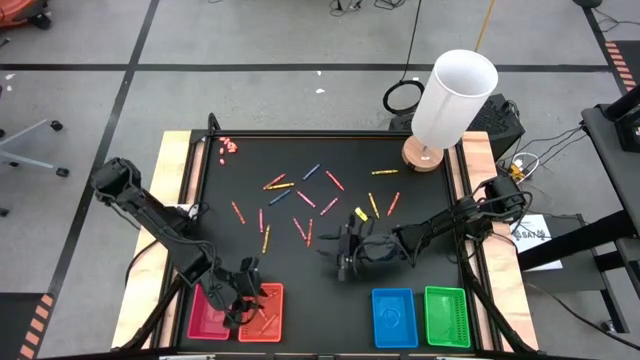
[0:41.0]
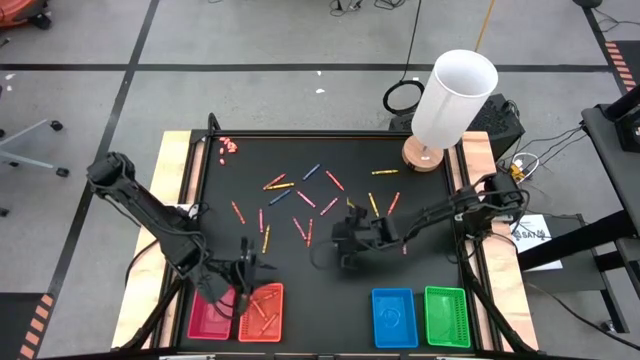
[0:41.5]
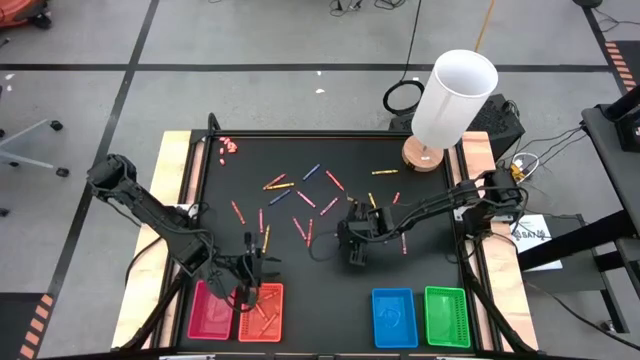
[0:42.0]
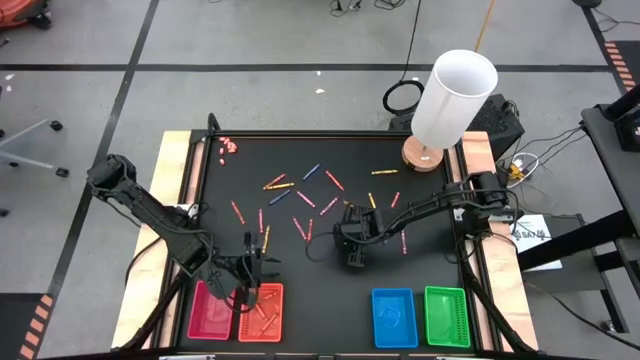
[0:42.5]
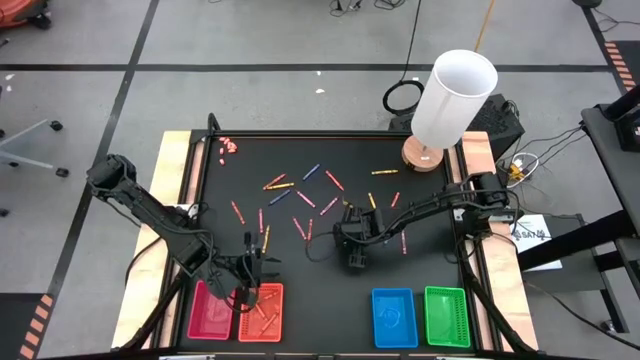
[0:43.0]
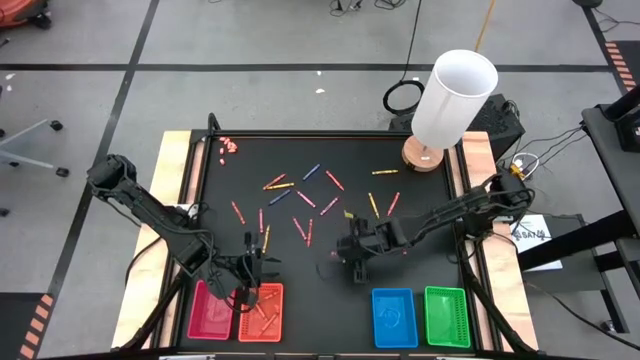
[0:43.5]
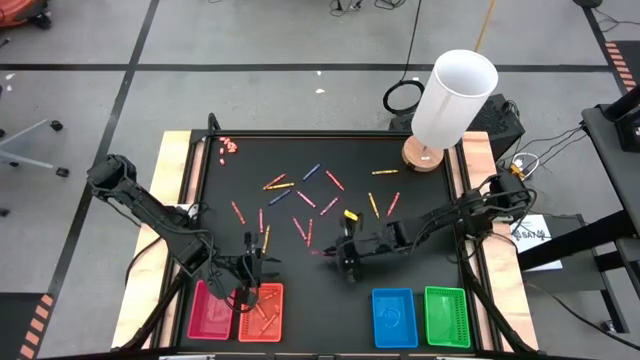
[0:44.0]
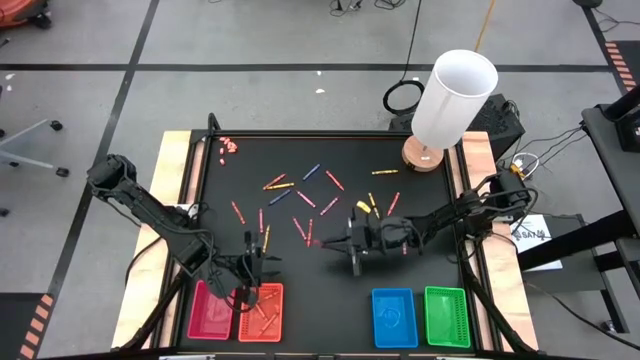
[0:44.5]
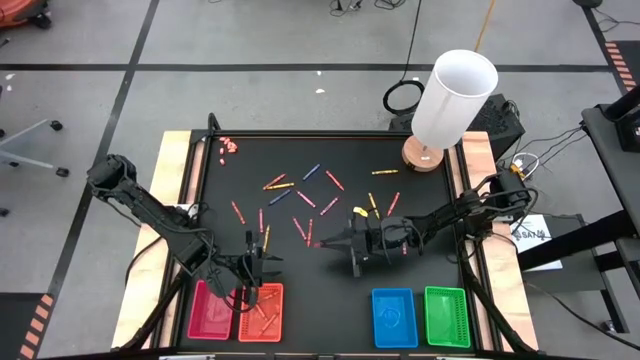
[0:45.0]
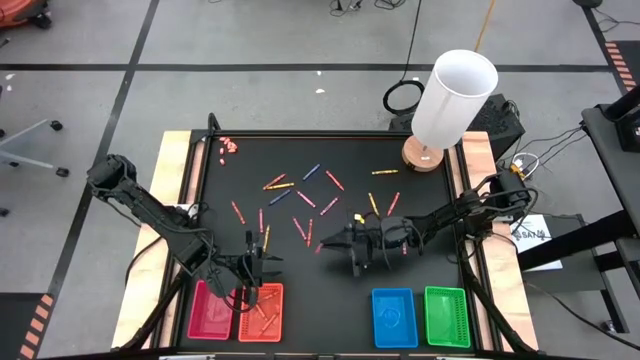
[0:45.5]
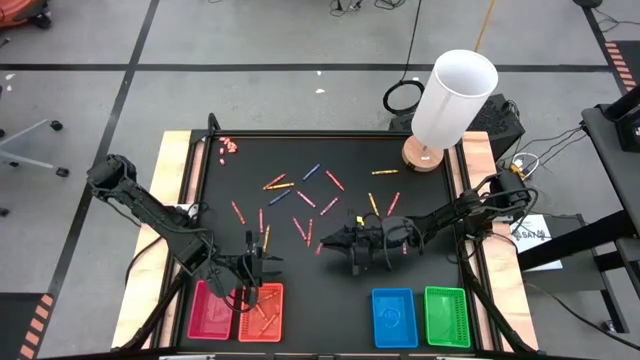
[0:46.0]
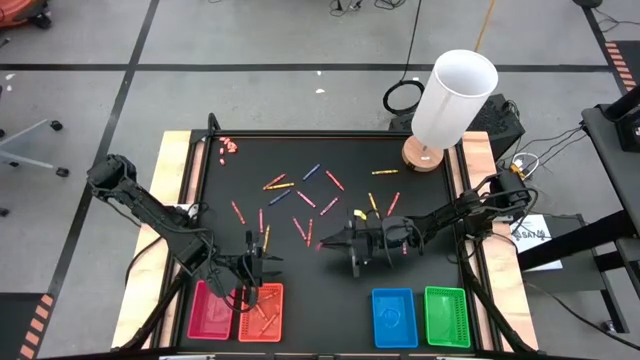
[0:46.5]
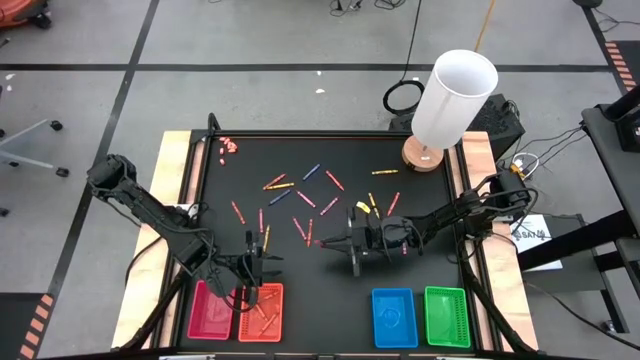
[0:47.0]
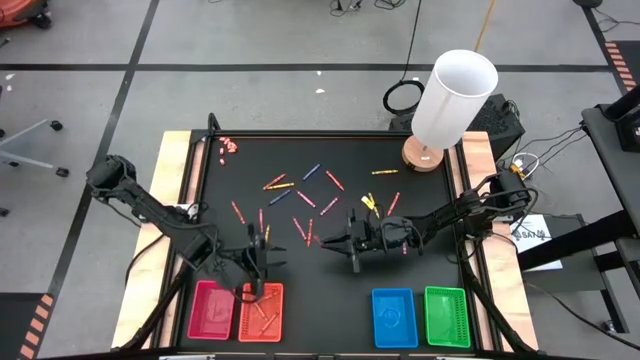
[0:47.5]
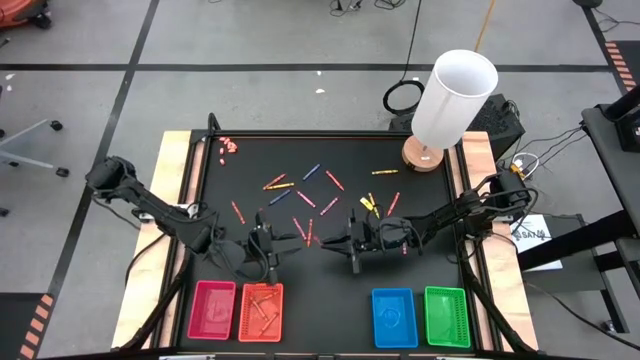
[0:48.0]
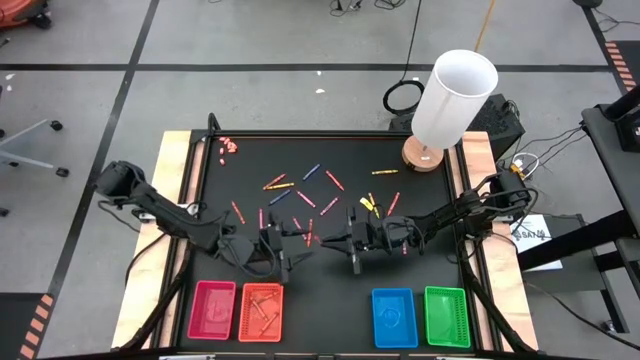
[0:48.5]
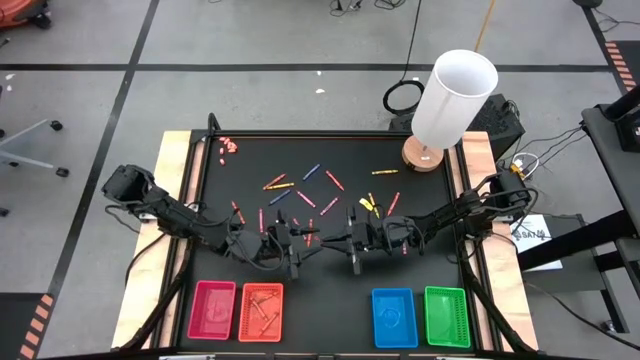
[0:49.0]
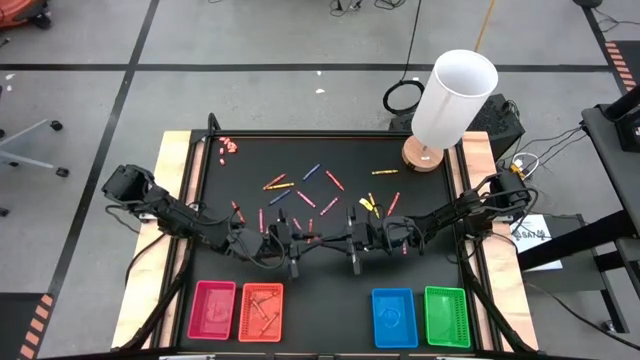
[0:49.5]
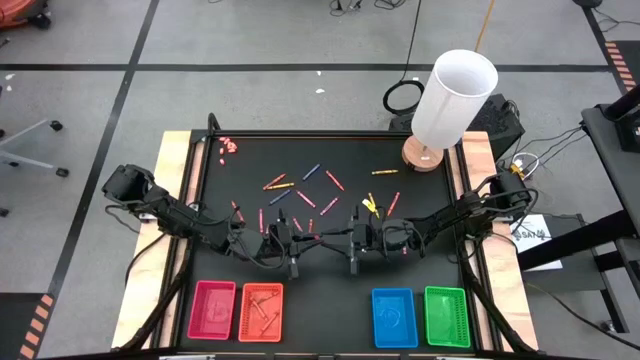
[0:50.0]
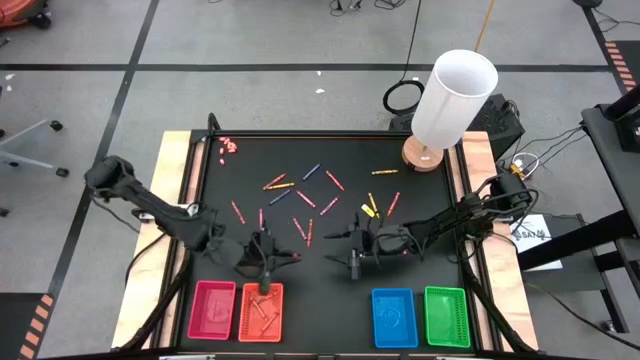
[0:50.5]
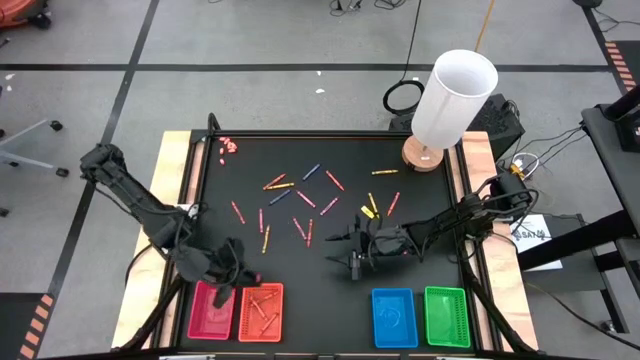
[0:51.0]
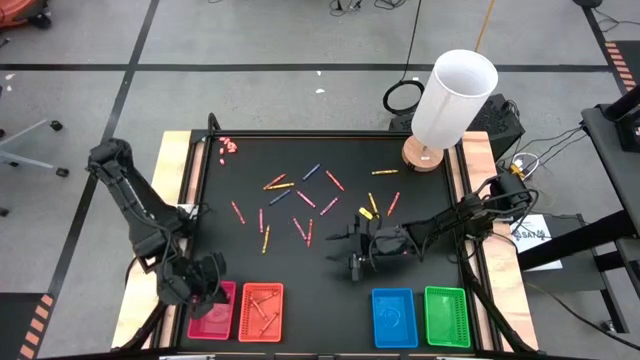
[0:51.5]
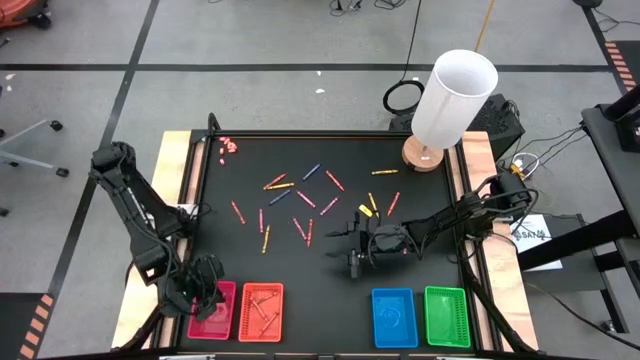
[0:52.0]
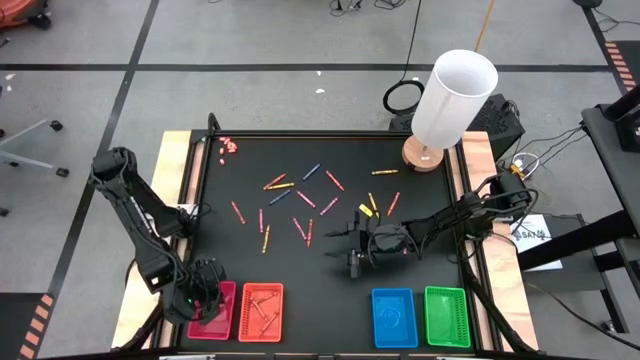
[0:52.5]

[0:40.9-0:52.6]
Task: Sort crayons
Put the red crayon into the red bin

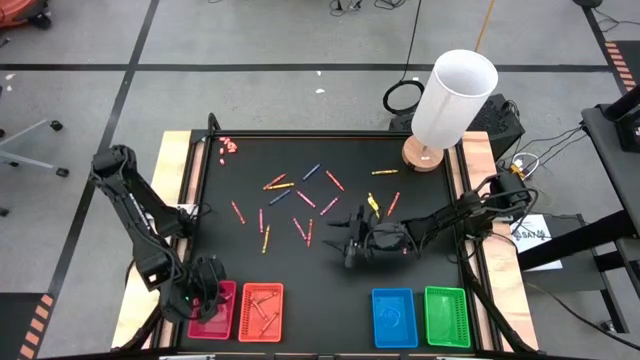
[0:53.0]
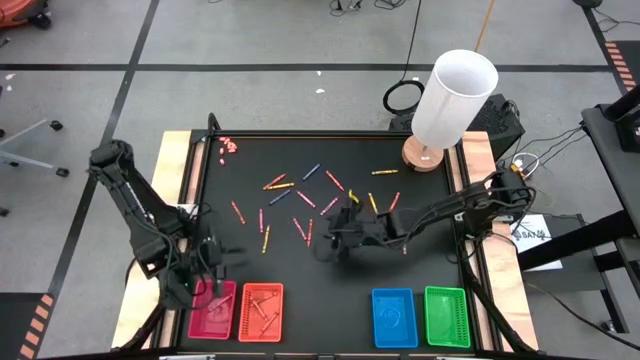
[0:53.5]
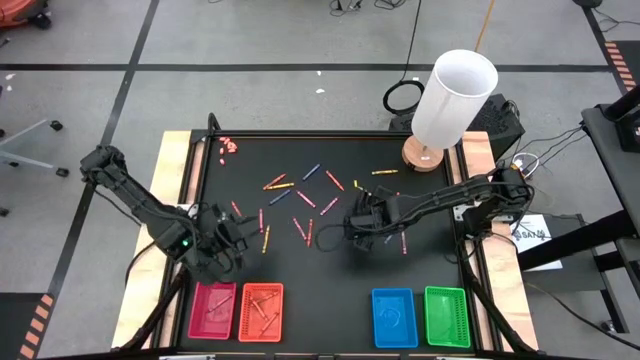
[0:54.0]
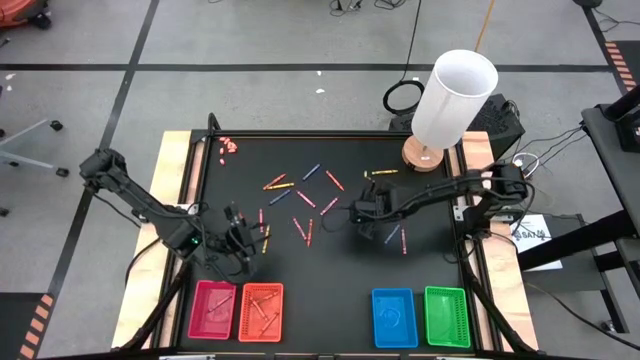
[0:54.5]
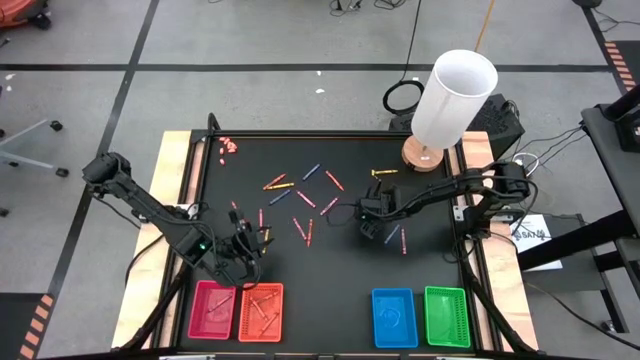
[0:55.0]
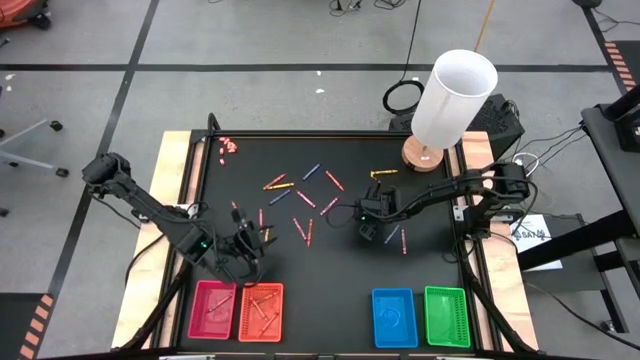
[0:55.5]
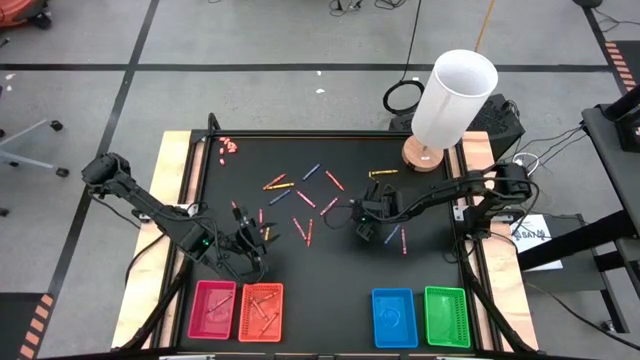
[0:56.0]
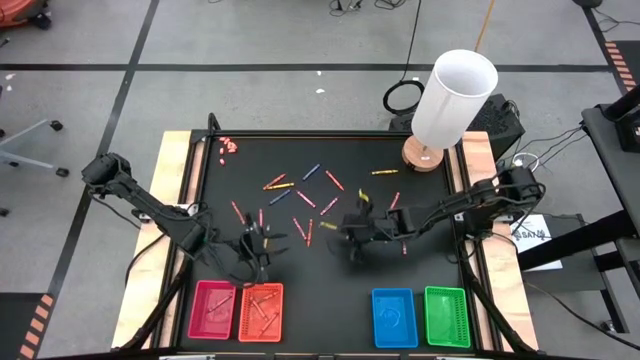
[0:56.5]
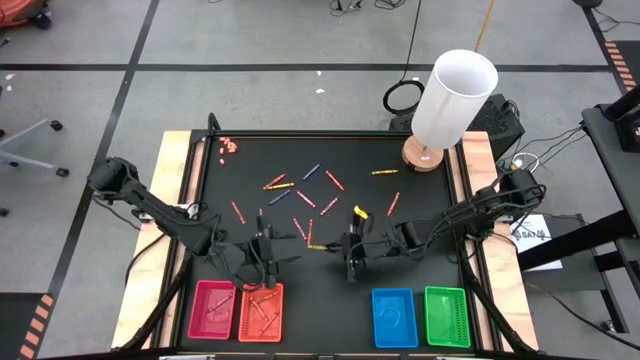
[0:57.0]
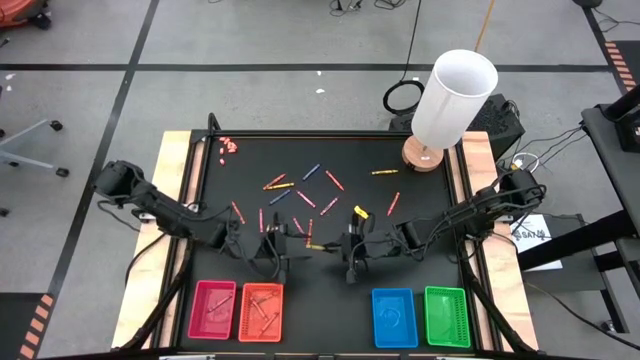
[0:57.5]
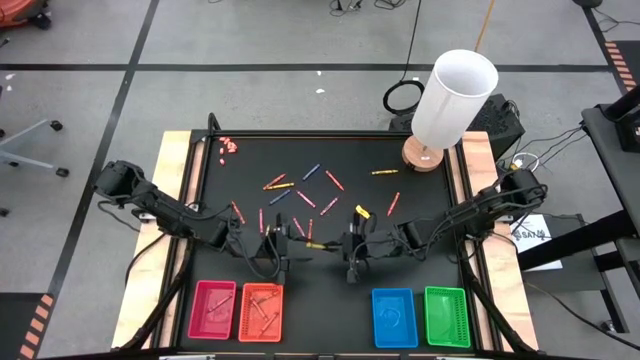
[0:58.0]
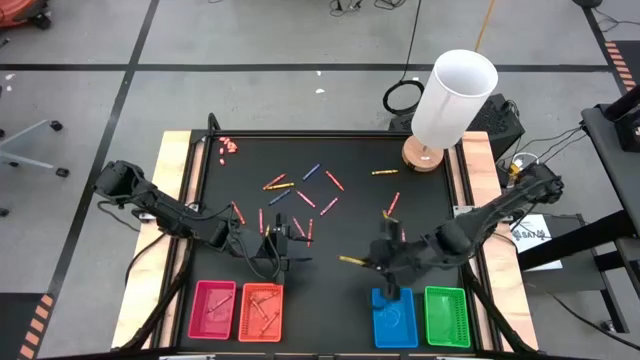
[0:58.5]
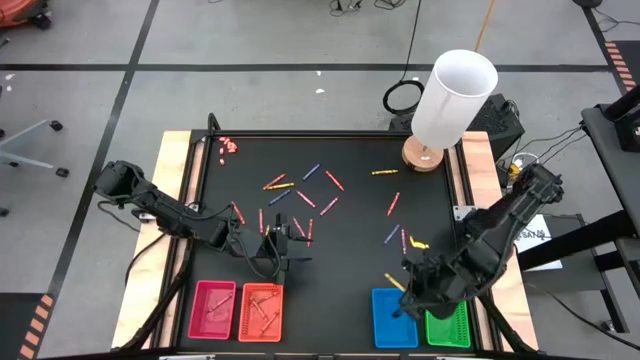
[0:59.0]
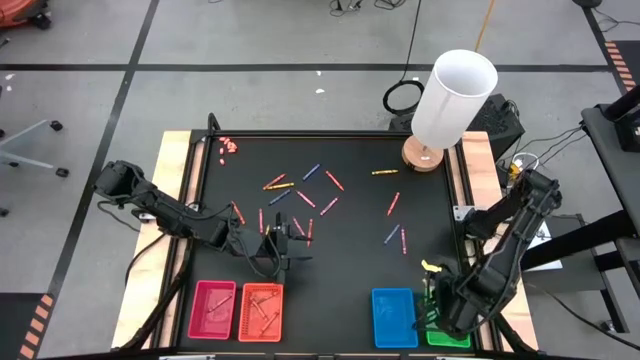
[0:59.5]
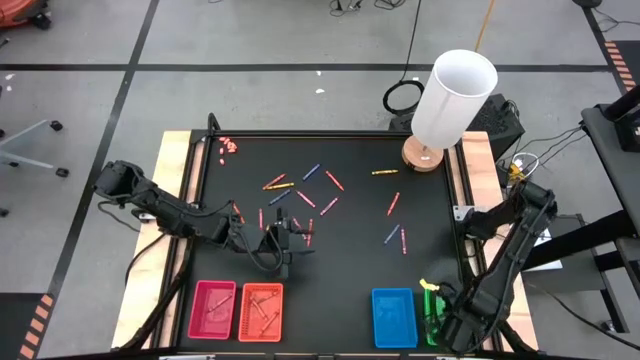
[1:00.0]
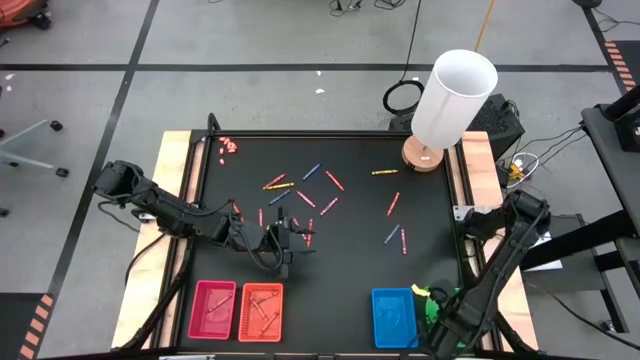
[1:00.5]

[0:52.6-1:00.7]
Put the green crayon into the green bin

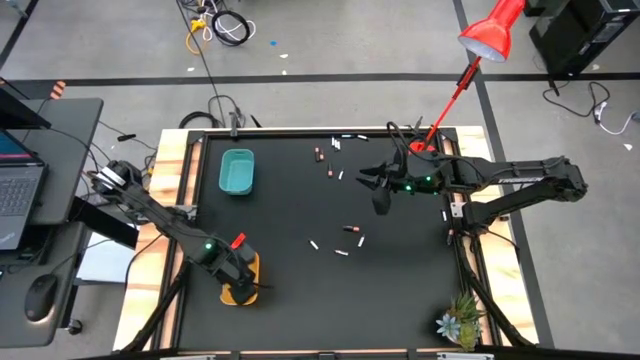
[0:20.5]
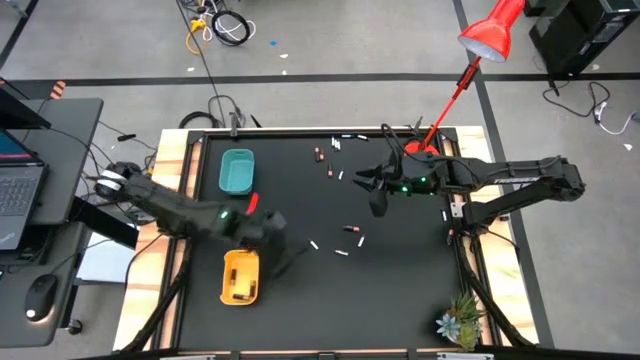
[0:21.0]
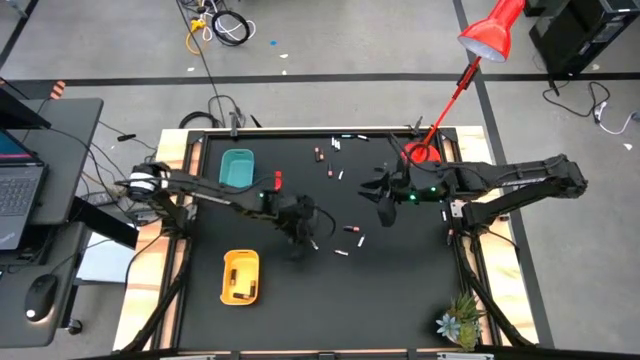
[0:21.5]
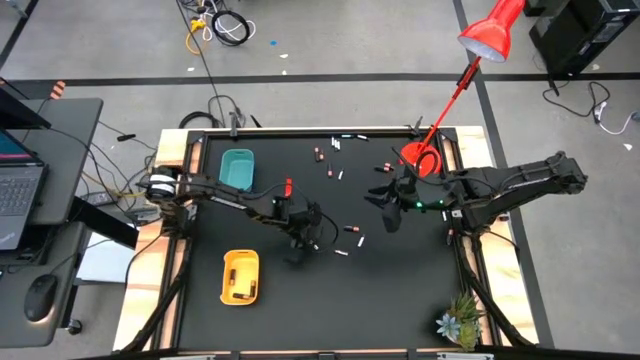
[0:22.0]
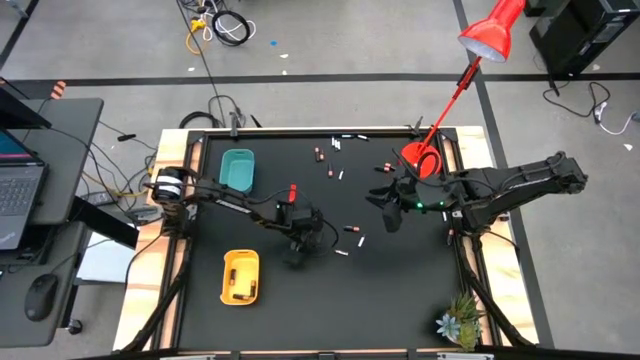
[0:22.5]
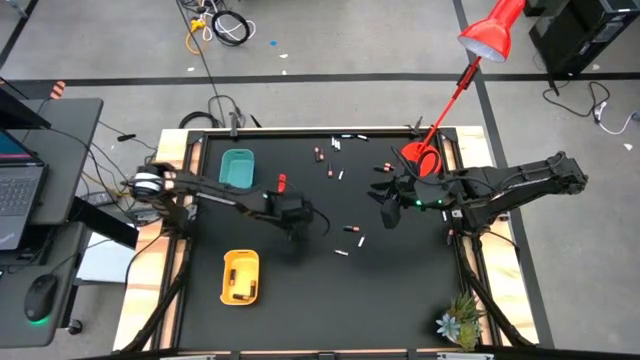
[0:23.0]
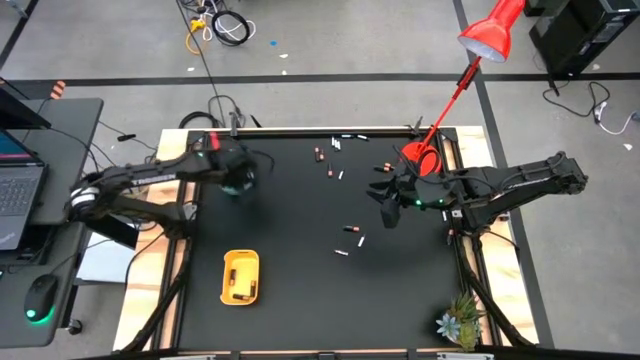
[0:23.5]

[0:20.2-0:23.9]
Task: Sort batteries
Put the white battery into the blue bin
